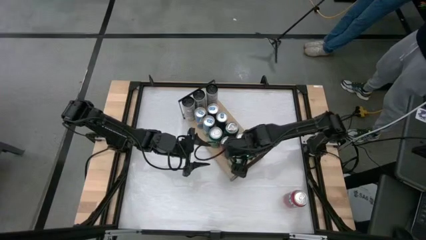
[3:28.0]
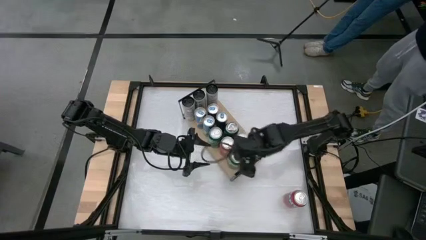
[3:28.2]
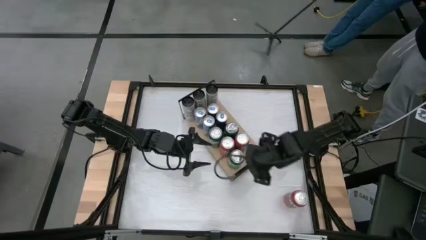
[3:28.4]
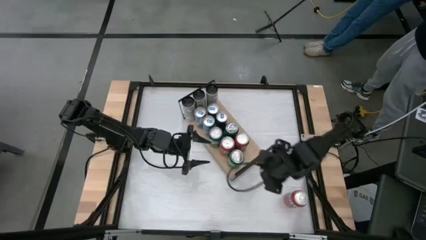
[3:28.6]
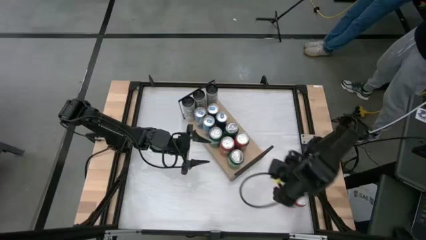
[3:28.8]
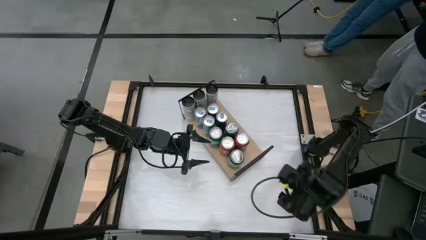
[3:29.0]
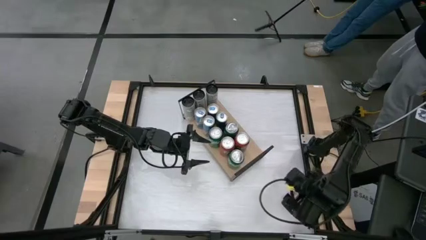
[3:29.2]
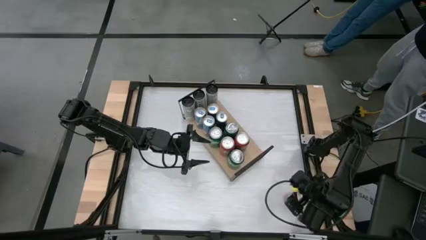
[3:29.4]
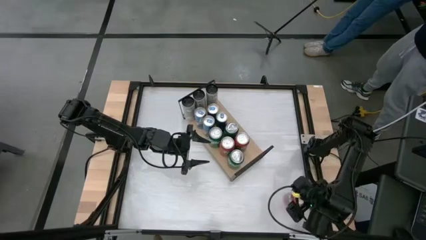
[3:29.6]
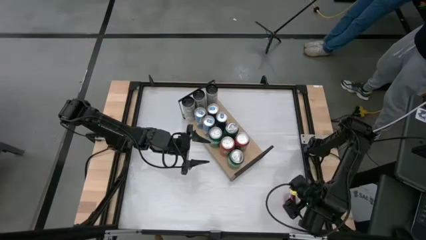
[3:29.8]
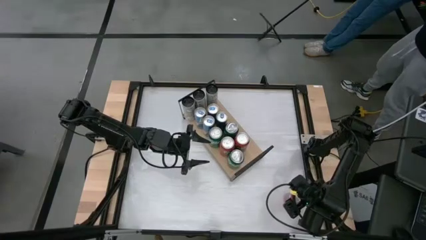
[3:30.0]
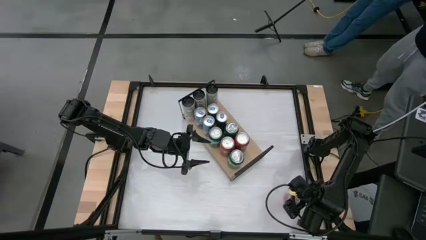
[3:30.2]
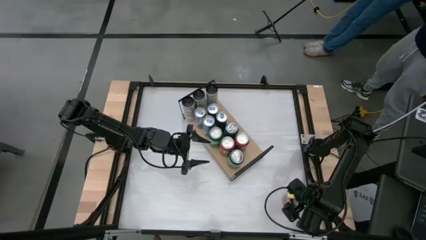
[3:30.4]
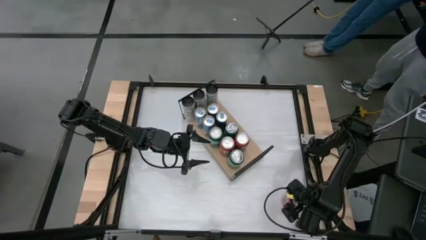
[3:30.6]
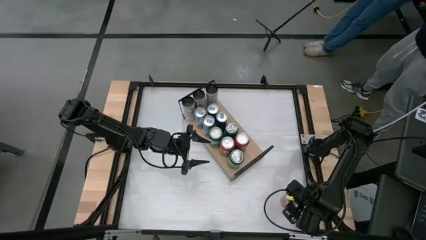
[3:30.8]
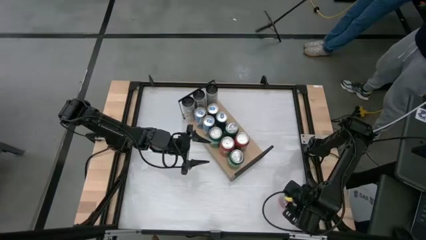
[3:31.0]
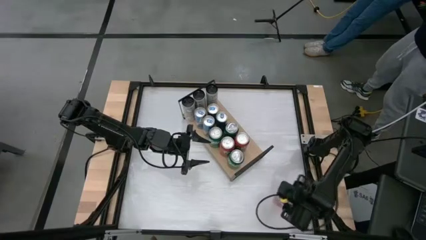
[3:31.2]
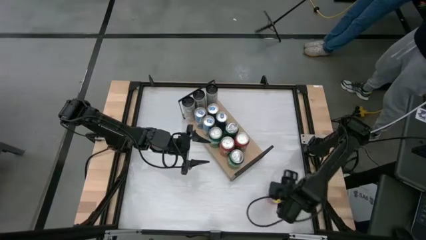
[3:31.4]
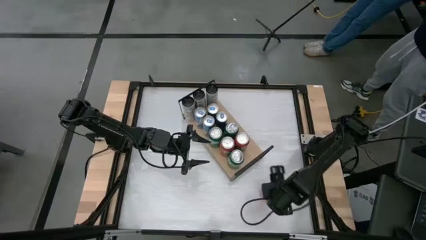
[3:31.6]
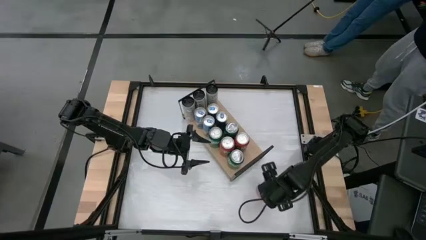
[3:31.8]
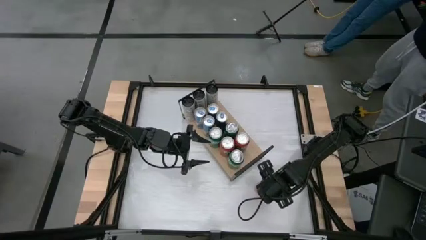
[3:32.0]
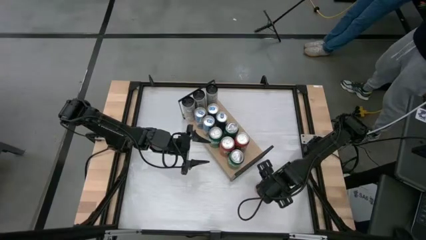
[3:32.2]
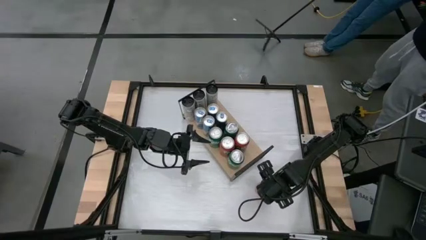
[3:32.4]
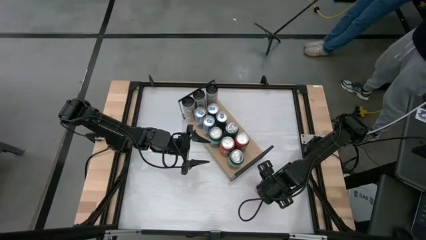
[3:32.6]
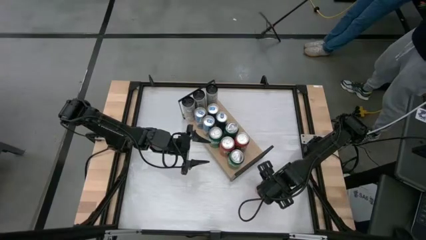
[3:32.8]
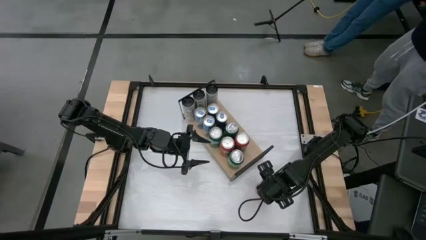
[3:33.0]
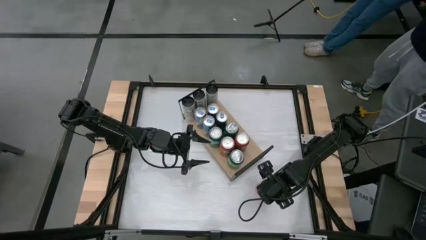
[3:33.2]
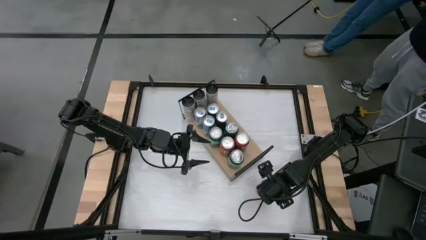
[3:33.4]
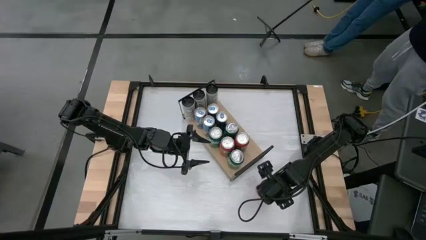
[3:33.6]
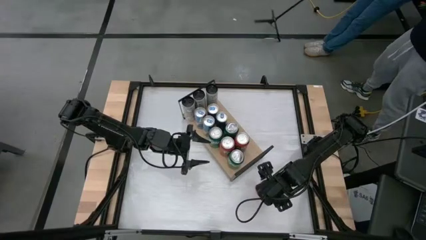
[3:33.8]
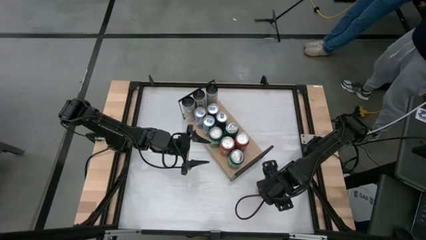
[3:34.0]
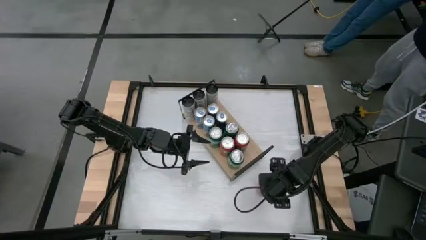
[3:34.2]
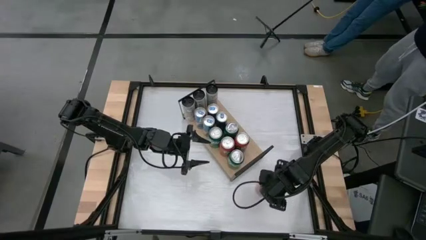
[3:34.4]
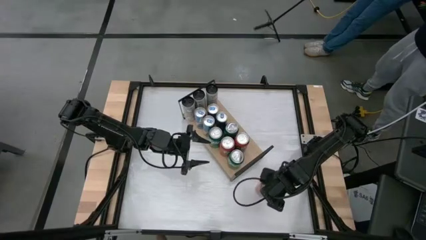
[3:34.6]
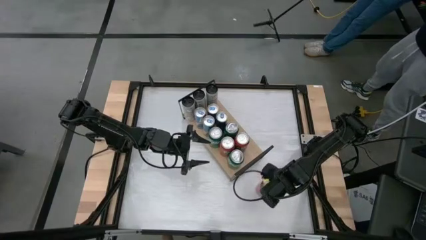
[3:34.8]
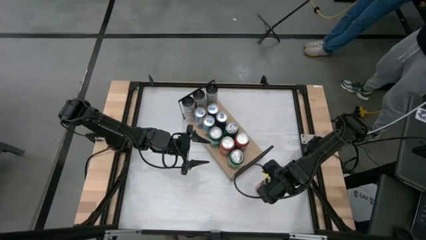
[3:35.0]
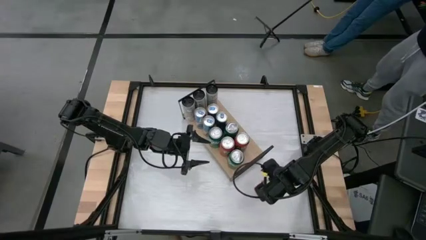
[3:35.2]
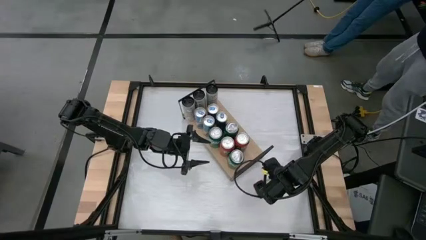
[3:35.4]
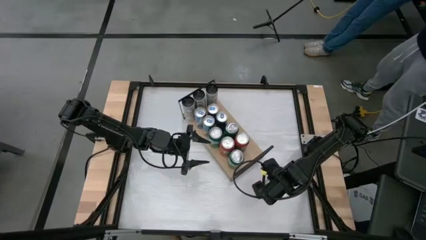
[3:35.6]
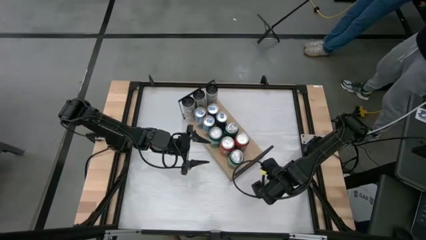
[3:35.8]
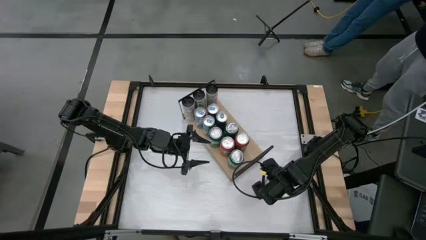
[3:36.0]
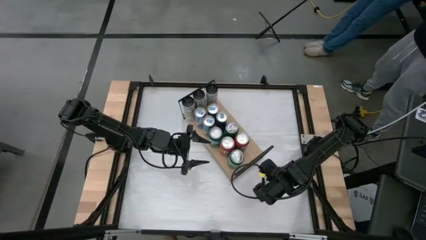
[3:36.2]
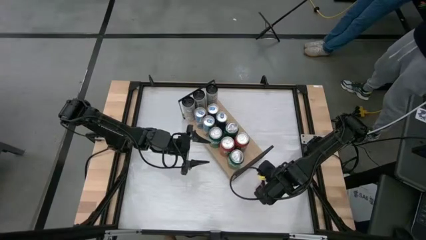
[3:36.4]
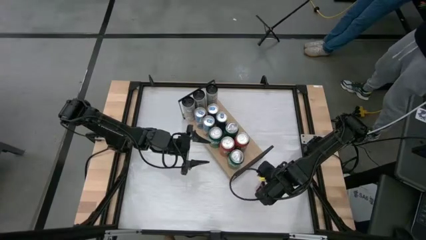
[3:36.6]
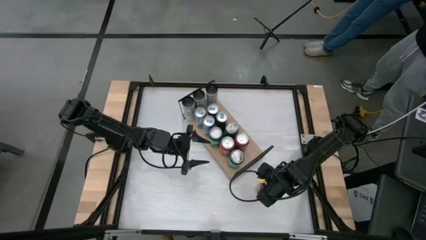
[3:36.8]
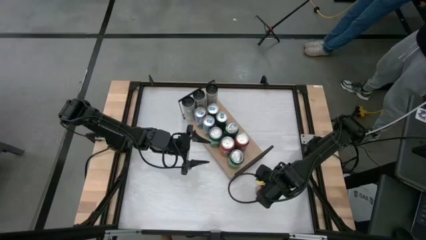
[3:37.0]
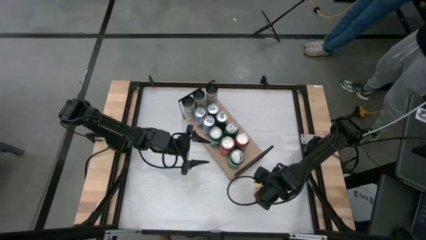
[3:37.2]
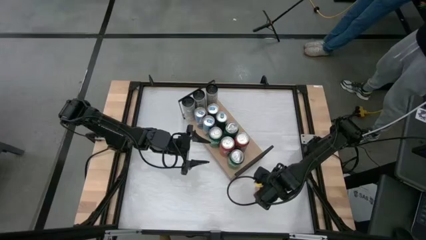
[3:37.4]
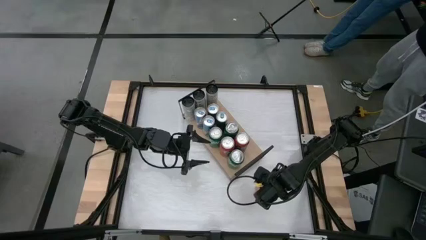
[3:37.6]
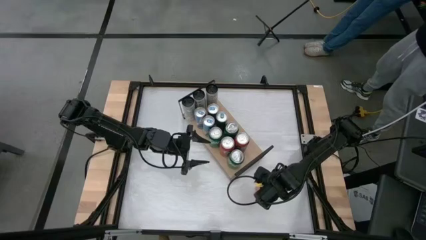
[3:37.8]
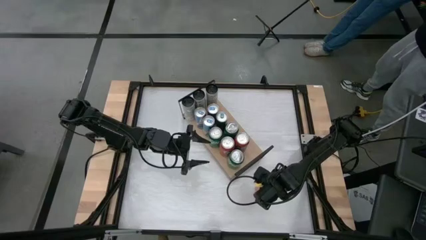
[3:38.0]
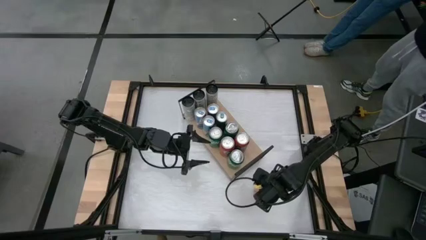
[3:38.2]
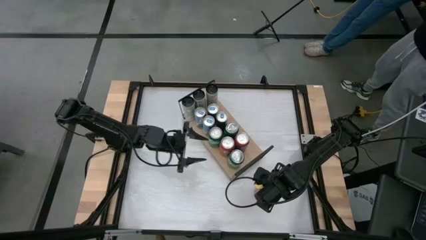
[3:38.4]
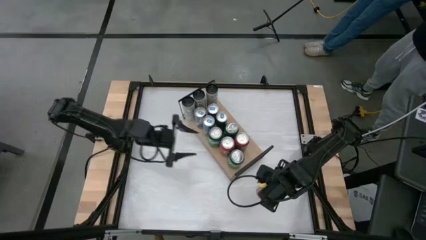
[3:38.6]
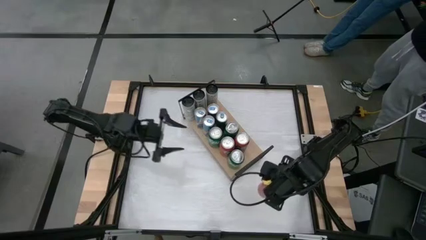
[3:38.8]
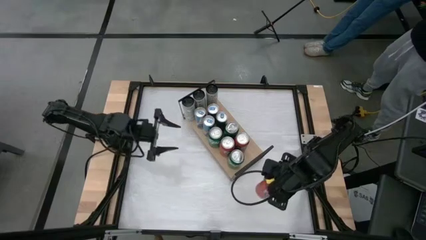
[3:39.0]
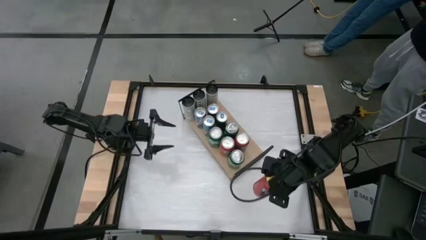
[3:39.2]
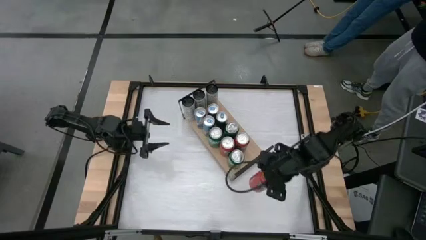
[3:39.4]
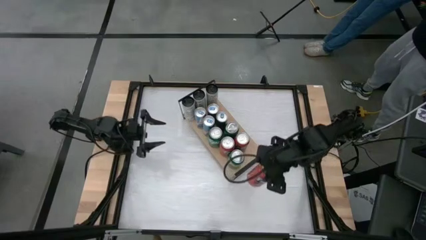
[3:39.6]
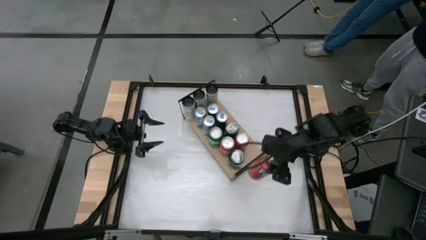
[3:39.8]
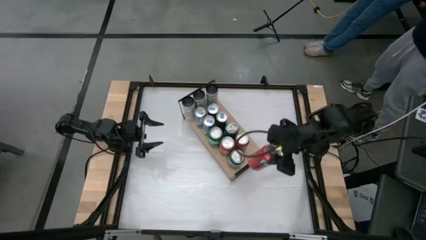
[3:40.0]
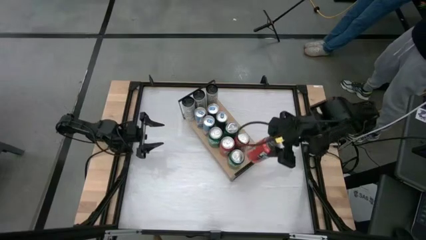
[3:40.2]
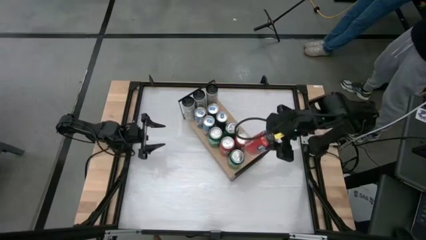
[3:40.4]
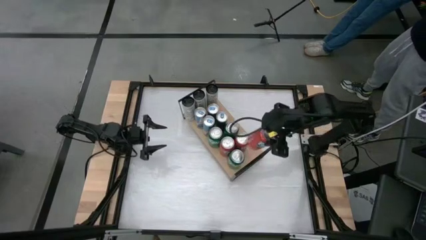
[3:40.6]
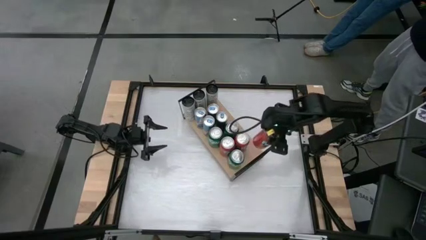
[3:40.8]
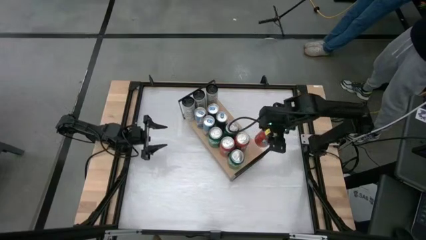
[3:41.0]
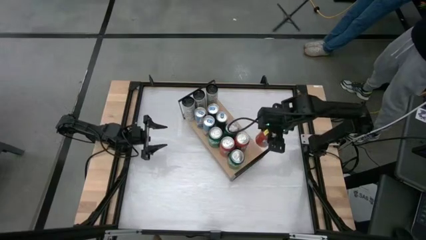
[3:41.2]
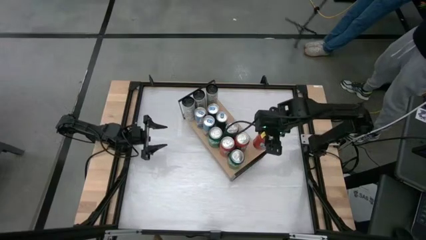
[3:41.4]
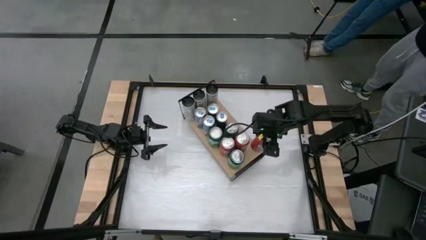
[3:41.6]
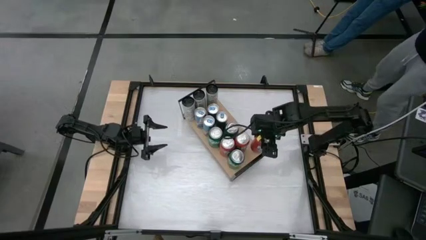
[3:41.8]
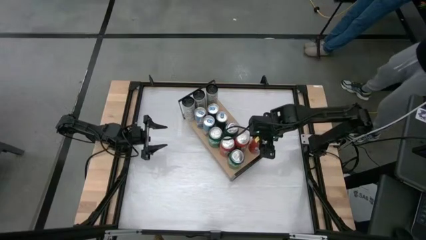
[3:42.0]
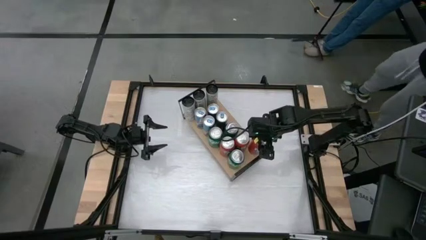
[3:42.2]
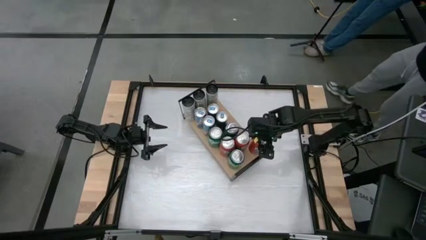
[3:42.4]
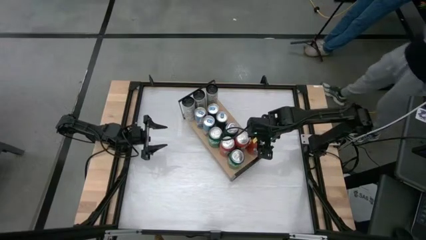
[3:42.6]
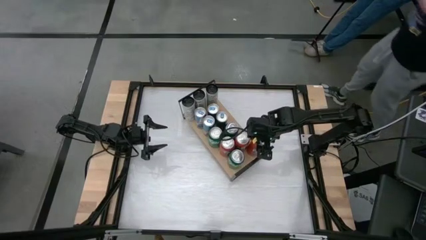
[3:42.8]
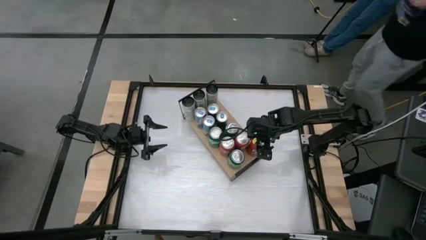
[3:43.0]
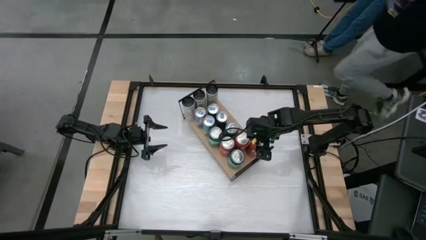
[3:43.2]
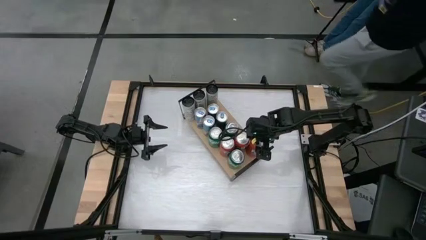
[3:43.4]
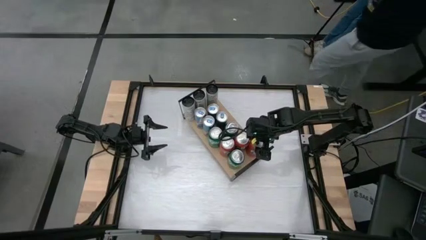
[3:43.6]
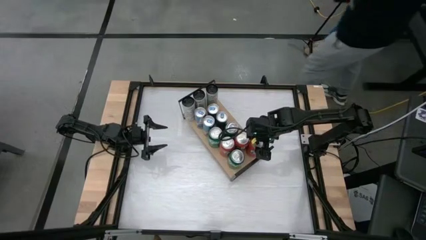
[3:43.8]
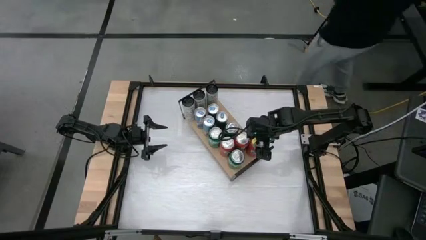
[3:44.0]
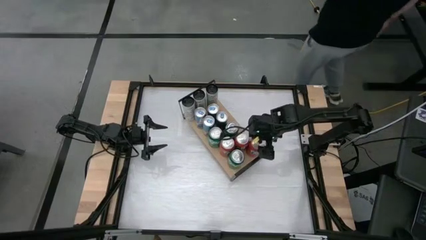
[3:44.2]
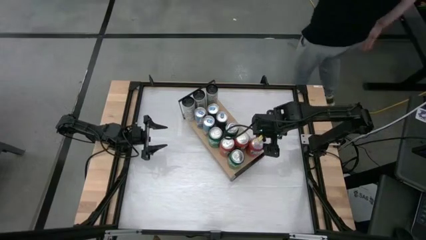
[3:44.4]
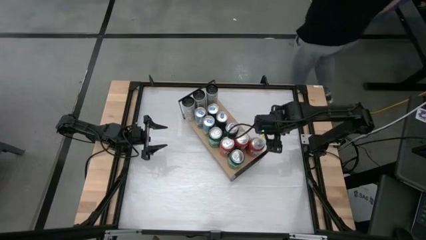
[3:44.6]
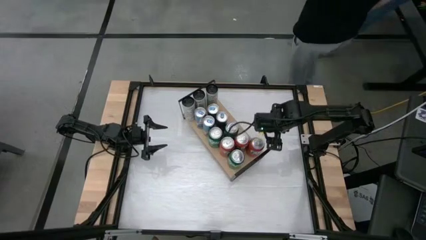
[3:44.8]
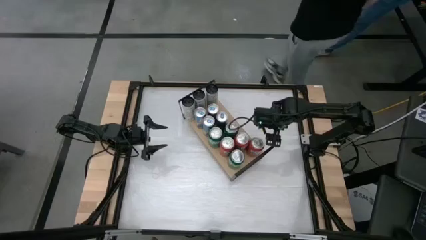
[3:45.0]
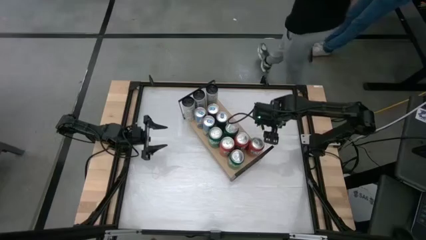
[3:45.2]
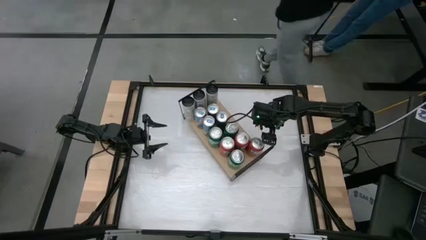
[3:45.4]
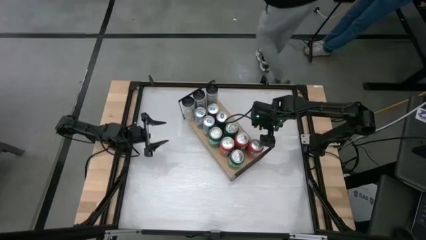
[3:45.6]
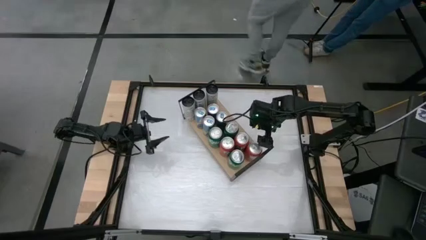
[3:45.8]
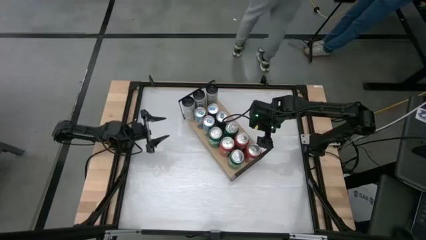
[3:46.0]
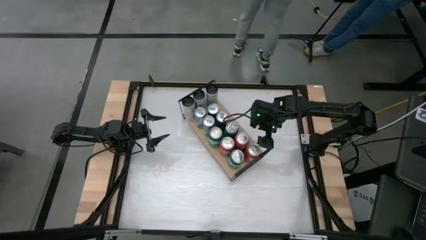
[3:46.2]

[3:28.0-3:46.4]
Task: Place canned beverage on shelf
Put the red soda can on the shelf
